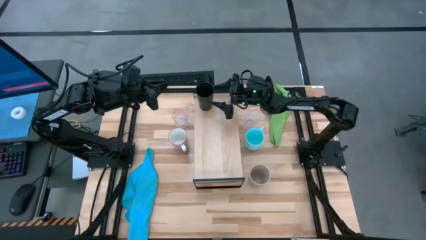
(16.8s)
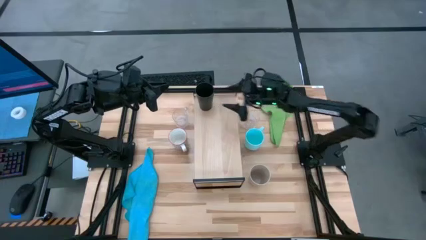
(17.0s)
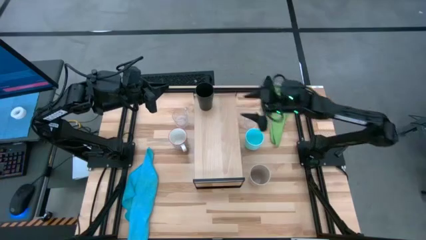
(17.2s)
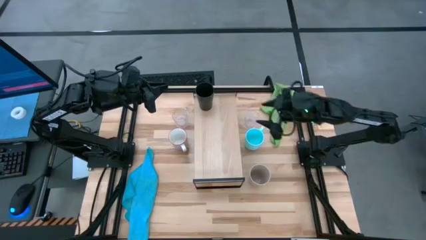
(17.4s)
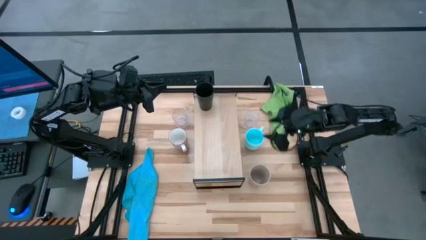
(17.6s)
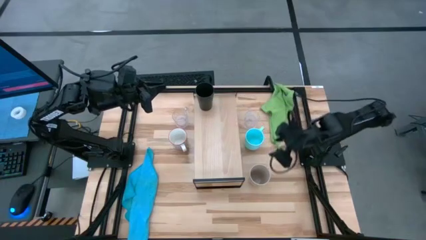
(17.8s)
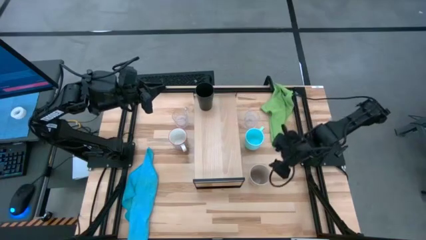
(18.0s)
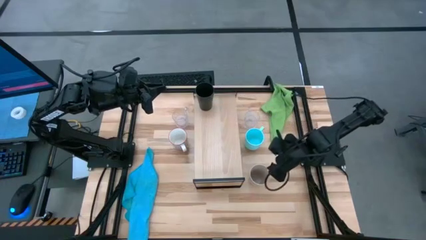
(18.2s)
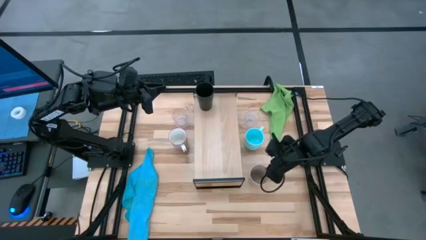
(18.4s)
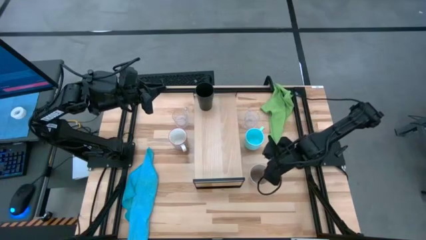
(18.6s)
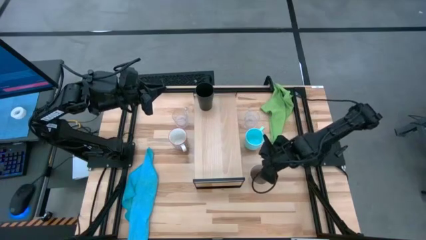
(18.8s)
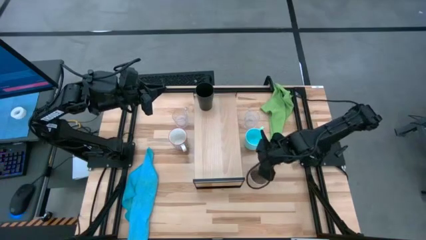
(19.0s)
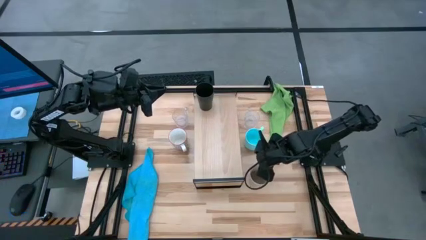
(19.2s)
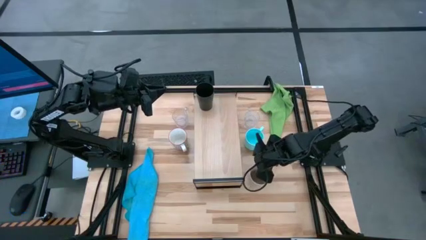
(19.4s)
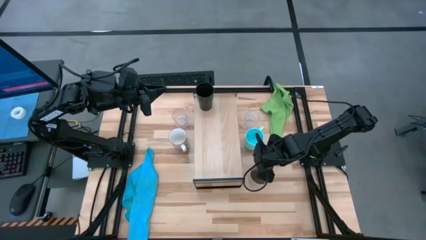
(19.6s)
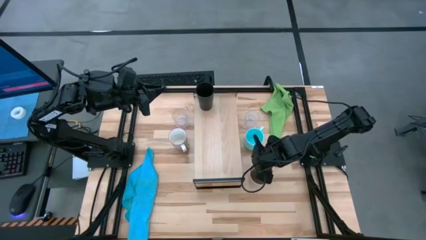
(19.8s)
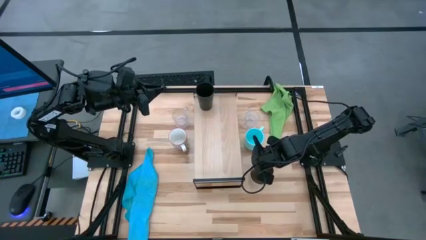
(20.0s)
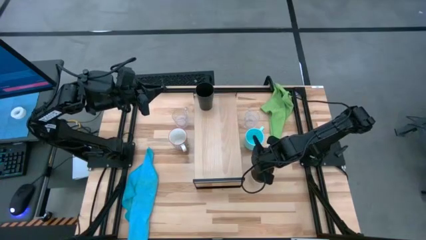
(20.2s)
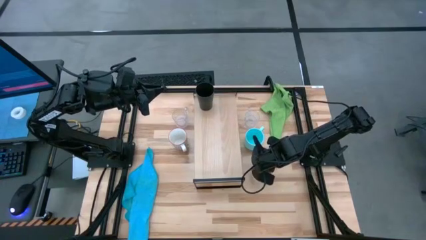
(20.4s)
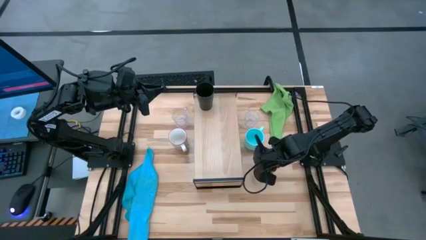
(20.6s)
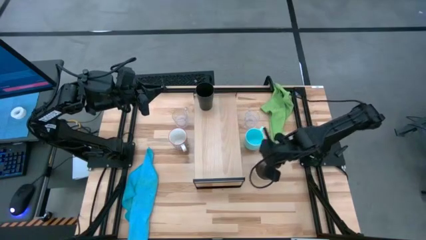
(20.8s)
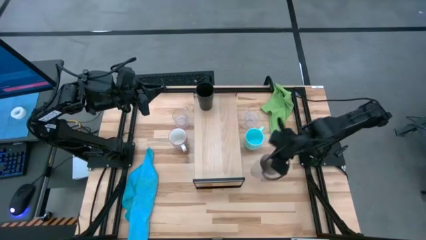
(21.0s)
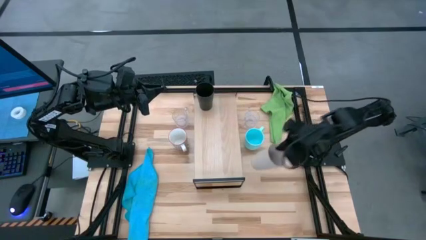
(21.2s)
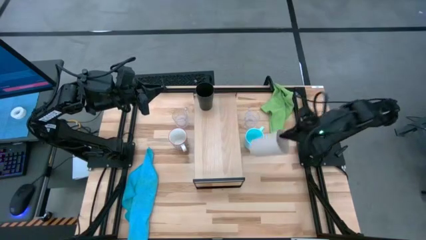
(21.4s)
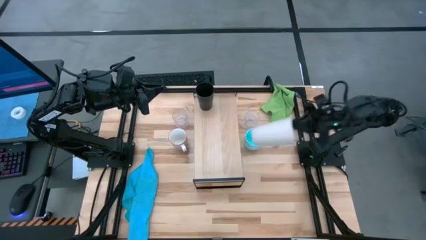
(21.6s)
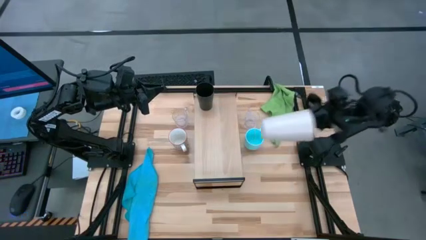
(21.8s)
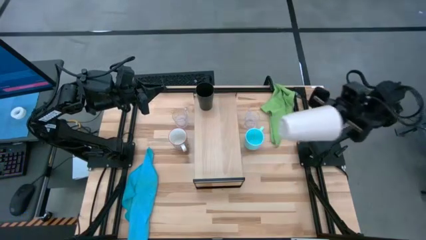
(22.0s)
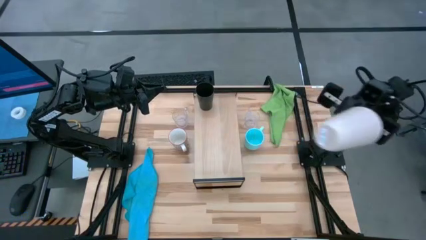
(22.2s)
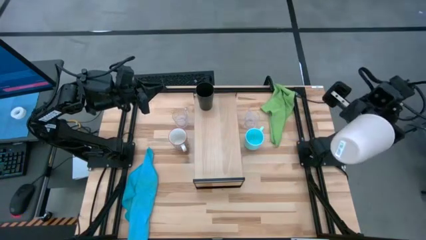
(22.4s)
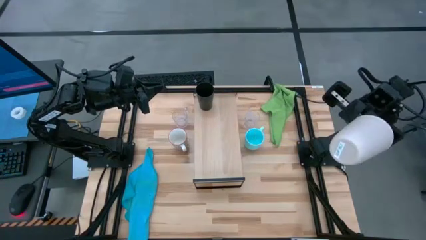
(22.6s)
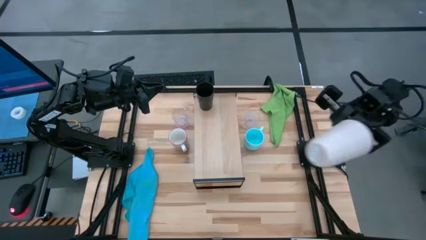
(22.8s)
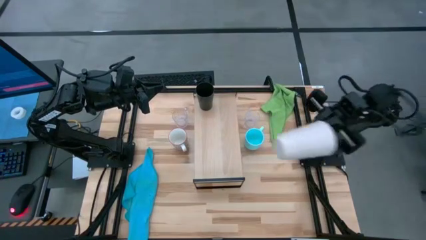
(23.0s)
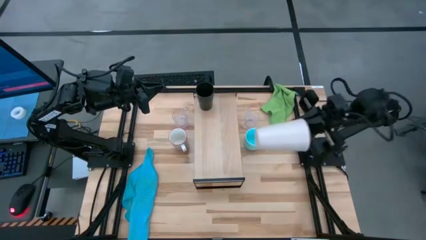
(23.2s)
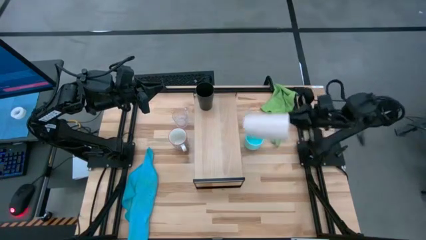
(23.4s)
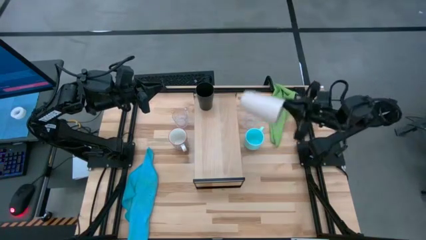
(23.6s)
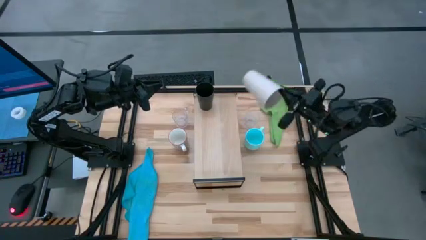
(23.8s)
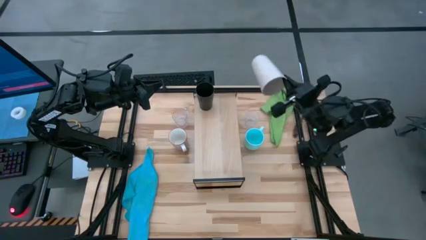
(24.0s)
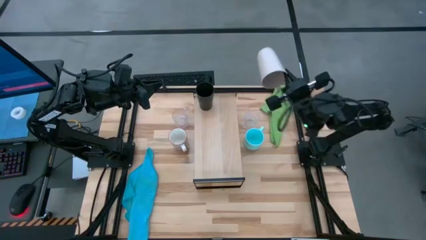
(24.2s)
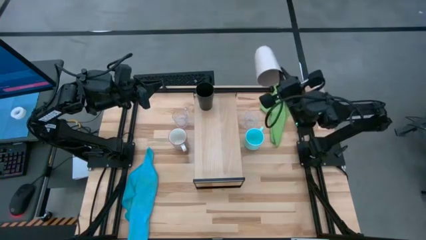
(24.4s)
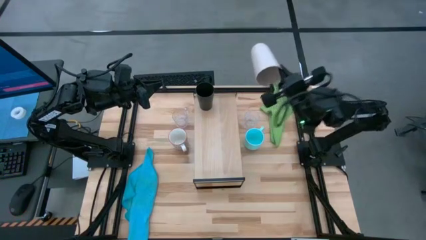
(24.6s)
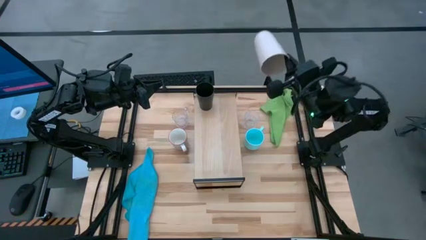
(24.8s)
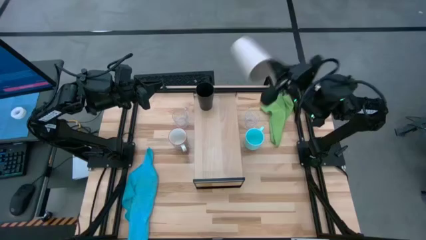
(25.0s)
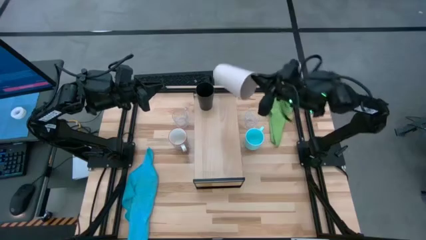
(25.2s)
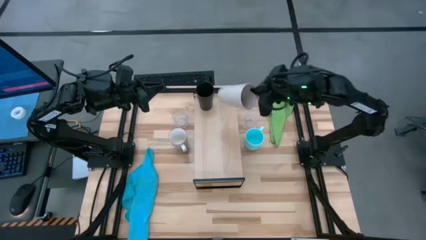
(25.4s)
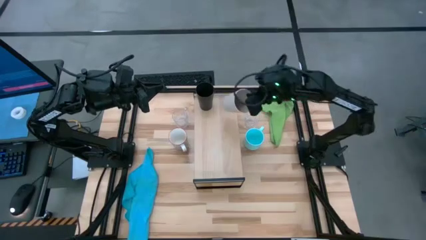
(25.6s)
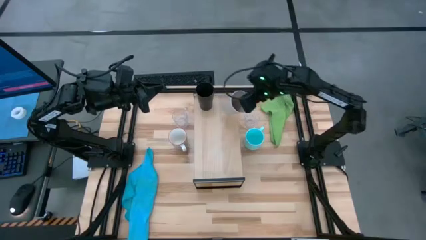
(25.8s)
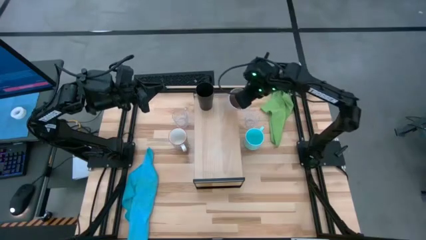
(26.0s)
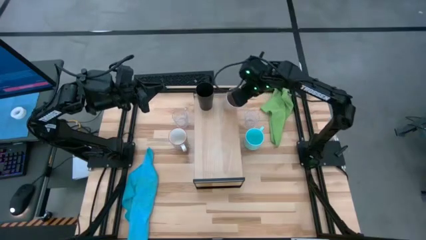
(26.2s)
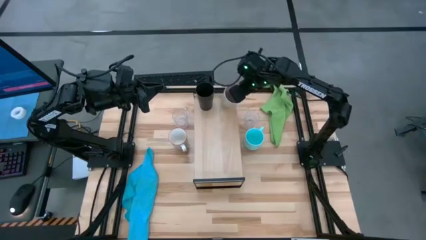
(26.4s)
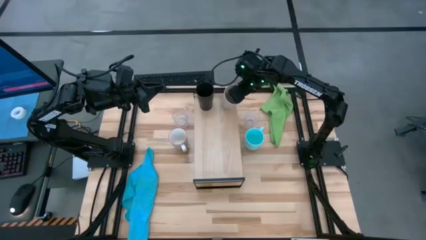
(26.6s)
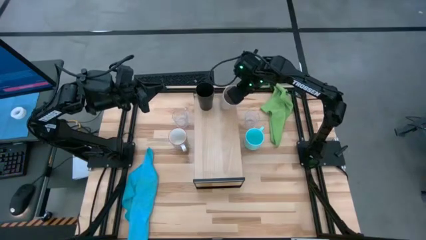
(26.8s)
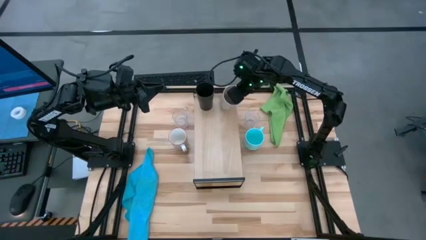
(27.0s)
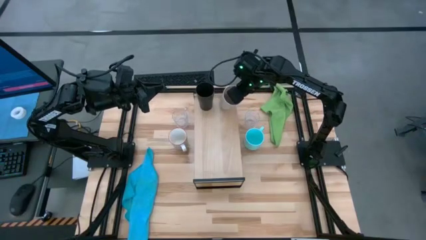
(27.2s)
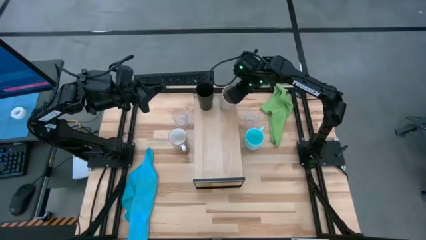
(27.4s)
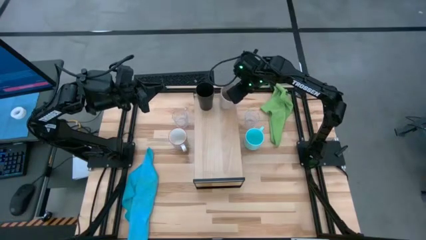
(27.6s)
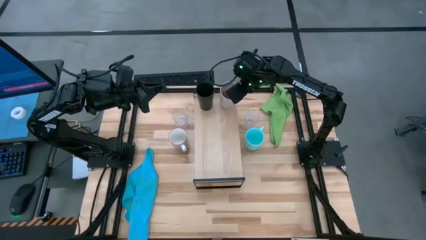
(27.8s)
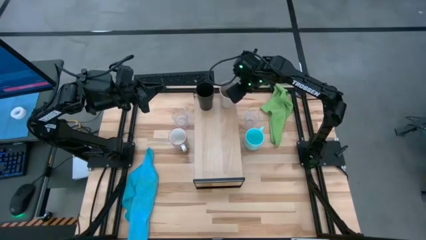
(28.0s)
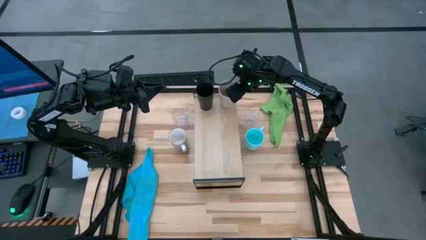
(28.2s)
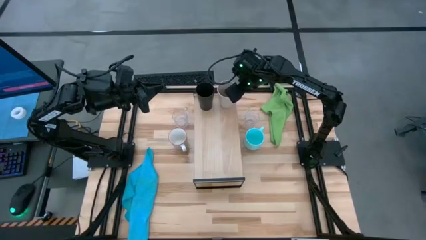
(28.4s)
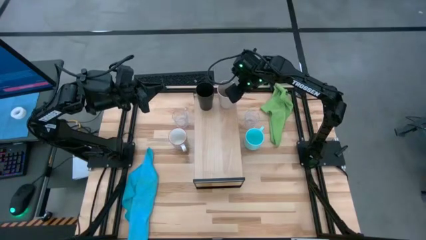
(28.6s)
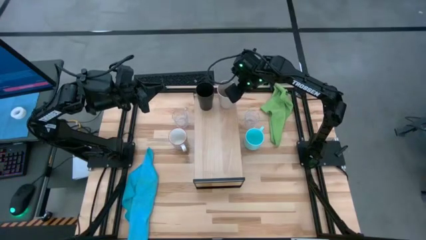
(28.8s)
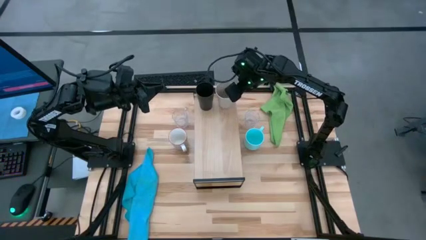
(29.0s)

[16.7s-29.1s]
Task: Stack small to large cups/mugs on shelf
Put the white cup on the shelf

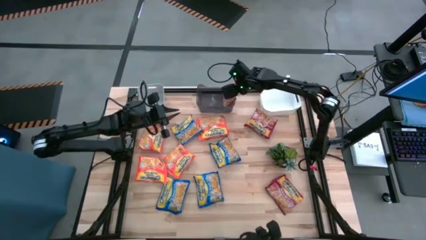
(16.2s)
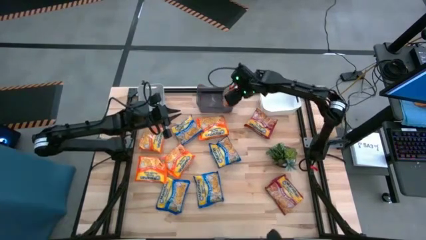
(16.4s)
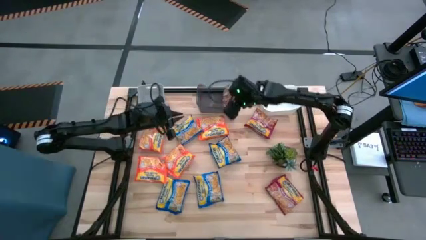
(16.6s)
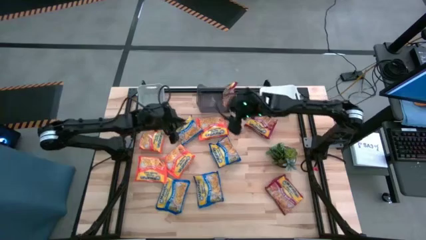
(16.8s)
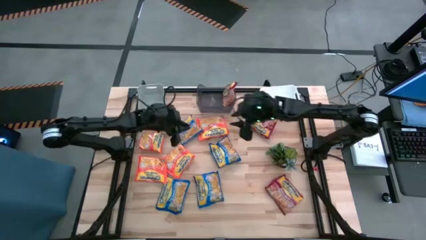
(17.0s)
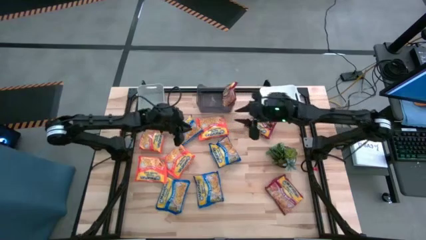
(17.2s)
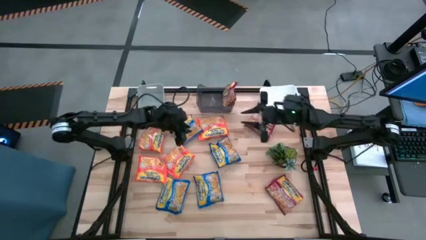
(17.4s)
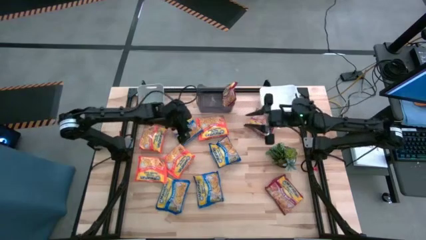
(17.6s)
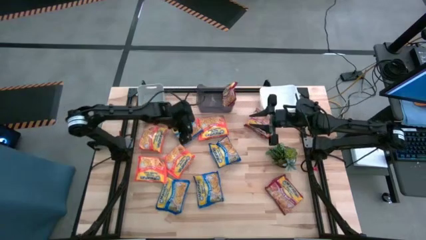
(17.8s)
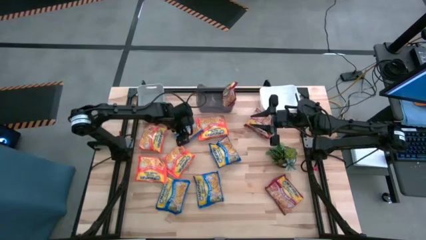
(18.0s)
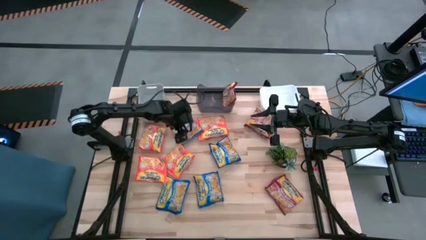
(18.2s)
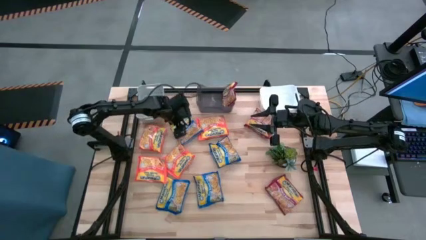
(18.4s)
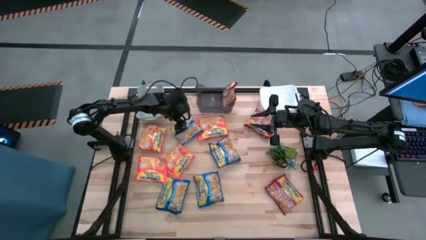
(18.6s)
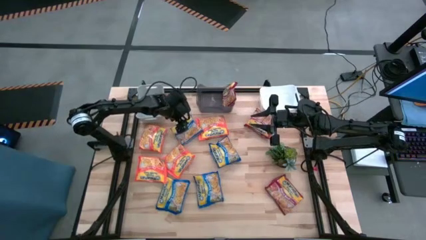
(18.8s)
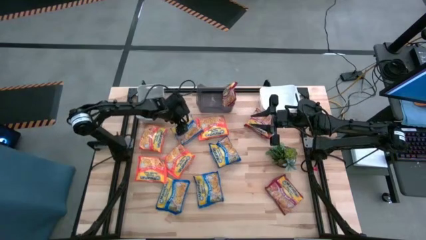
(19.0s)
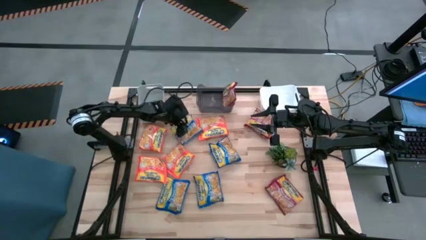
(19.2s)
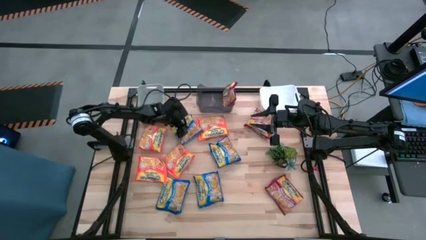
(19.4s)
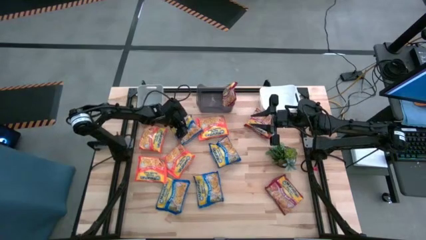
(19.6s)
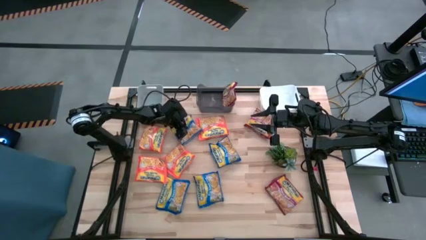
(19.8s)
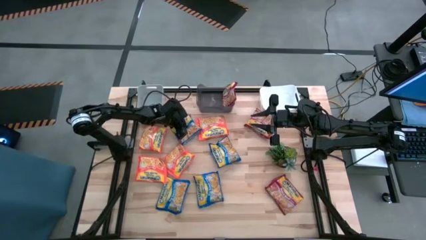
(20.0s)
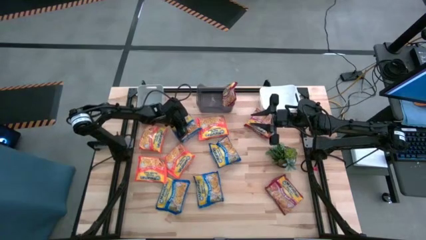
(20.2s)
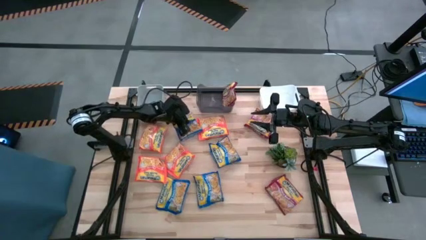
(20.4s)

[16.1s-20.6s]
Task: Sort Maruchan noodles
Put the blue noodle pack into the gray bin

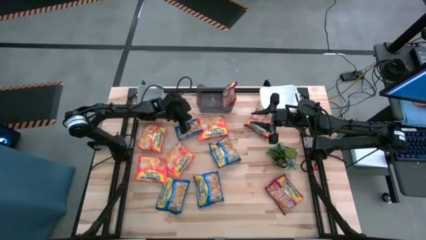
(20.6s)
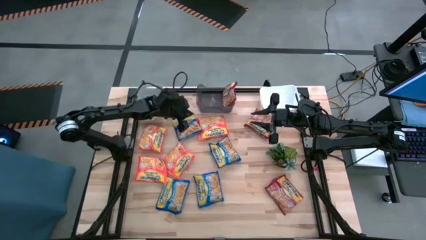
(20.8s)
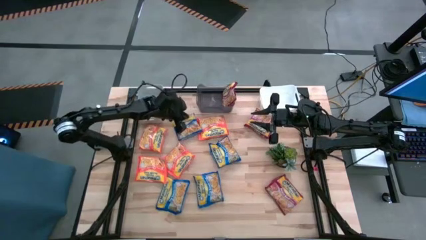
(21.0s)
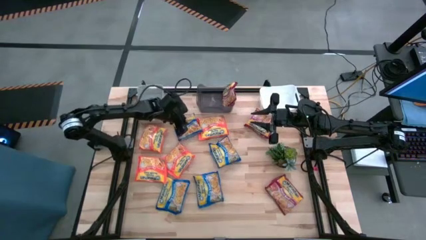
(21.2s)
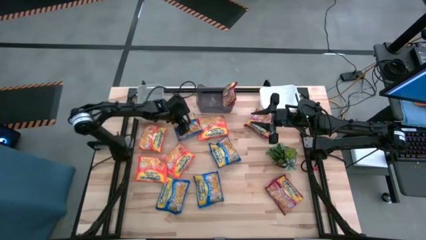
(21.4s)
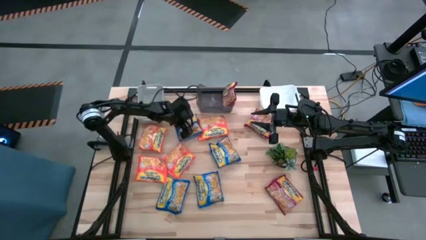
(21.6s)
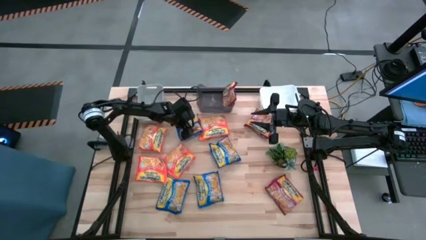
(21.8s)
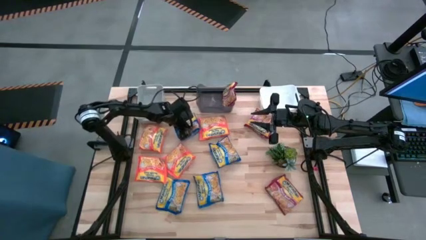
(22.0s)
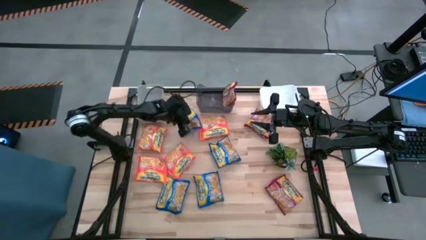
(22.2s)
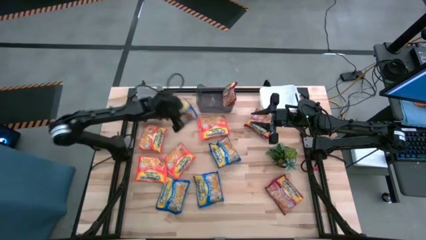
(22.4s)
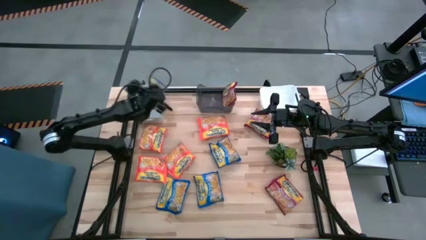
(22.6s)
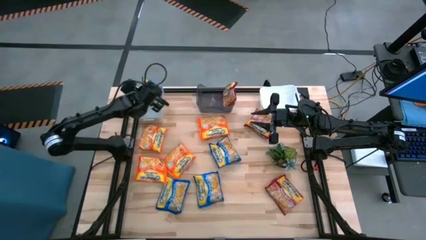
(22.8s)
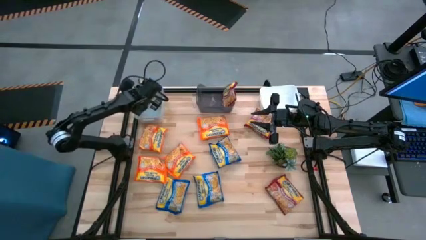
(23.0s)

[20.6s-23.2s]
Put the blue noodle pack into the gray bin
